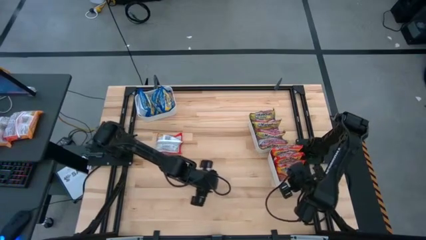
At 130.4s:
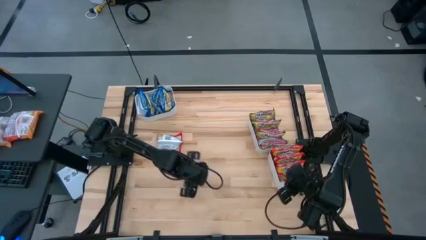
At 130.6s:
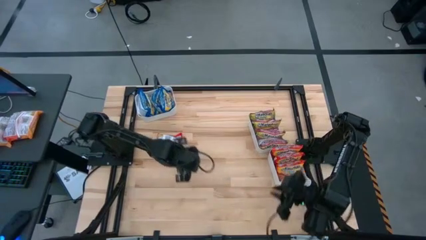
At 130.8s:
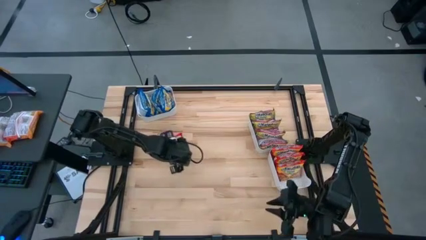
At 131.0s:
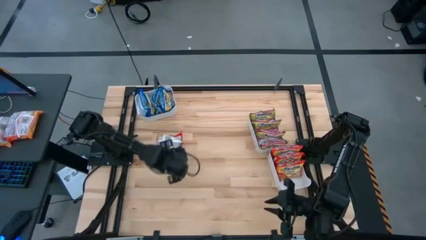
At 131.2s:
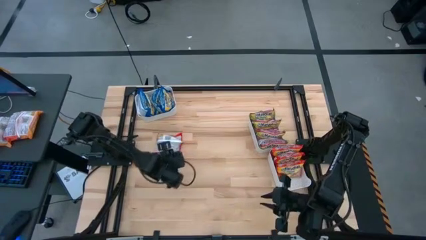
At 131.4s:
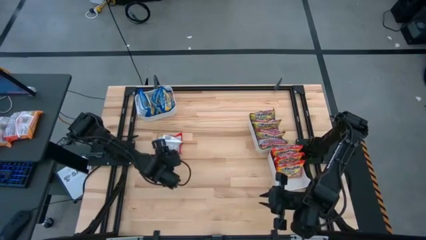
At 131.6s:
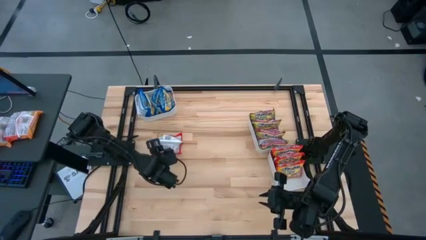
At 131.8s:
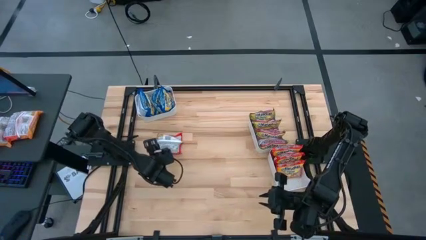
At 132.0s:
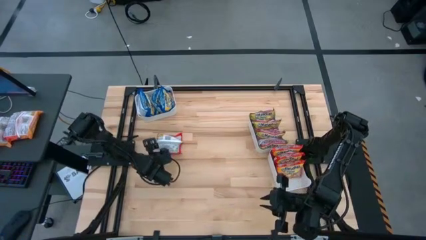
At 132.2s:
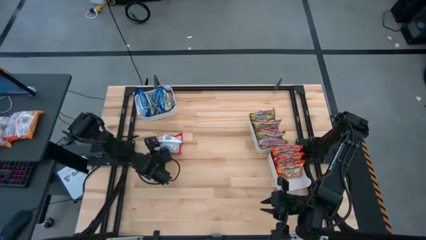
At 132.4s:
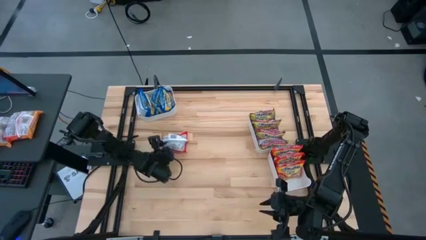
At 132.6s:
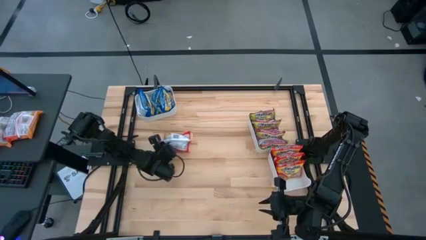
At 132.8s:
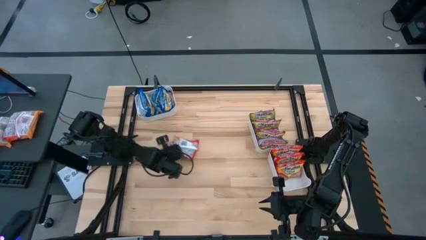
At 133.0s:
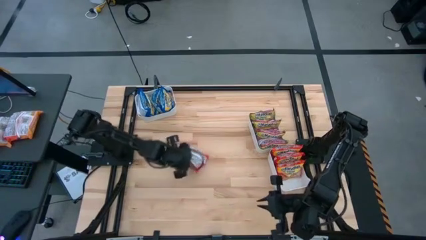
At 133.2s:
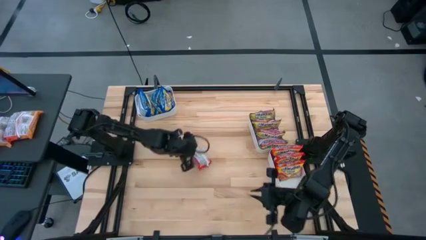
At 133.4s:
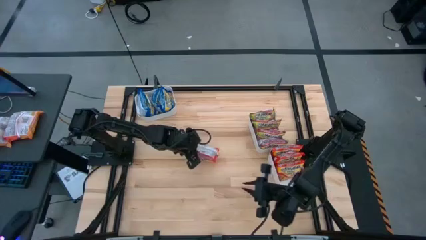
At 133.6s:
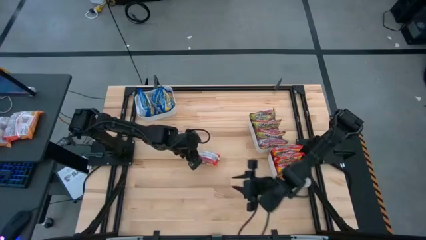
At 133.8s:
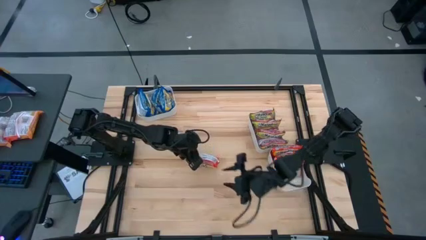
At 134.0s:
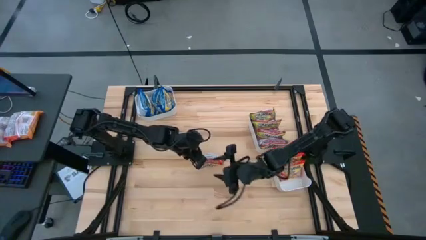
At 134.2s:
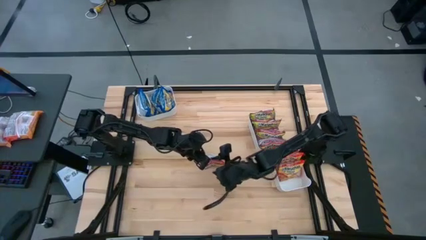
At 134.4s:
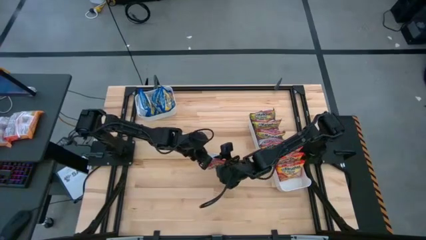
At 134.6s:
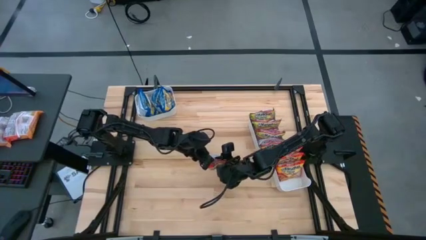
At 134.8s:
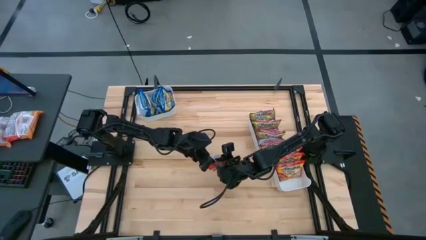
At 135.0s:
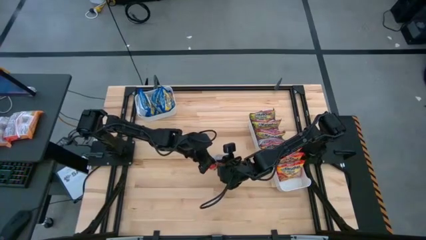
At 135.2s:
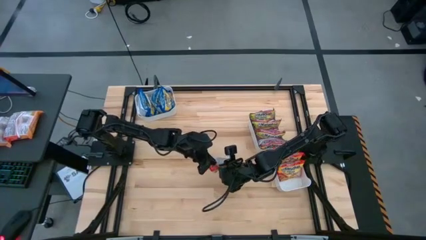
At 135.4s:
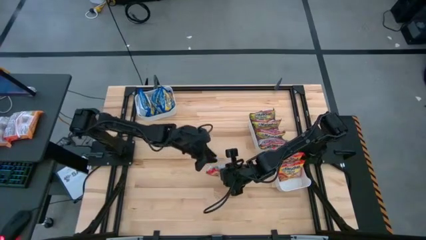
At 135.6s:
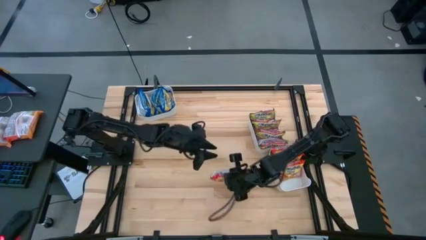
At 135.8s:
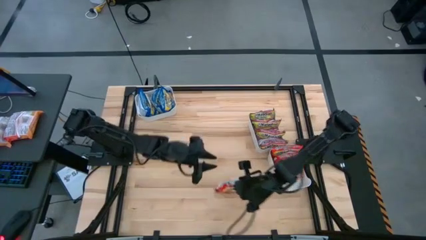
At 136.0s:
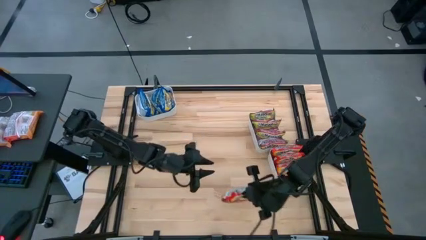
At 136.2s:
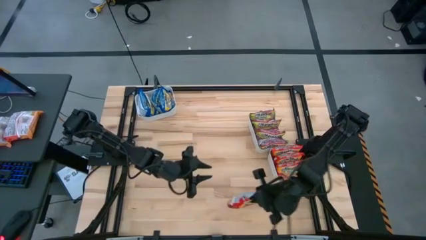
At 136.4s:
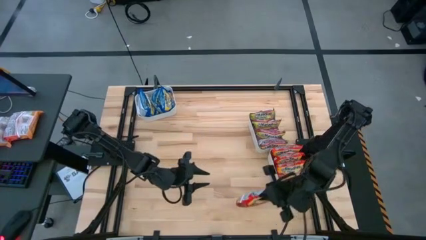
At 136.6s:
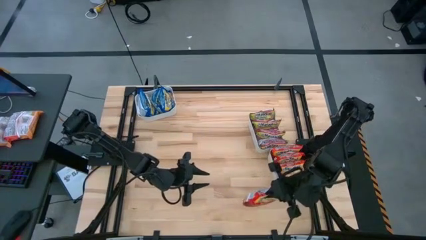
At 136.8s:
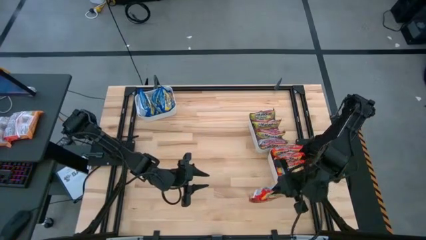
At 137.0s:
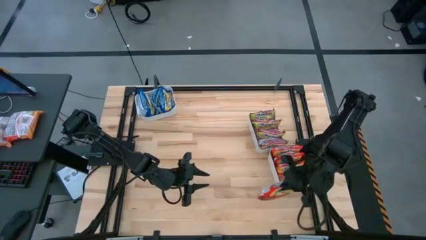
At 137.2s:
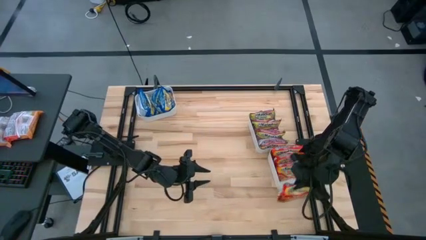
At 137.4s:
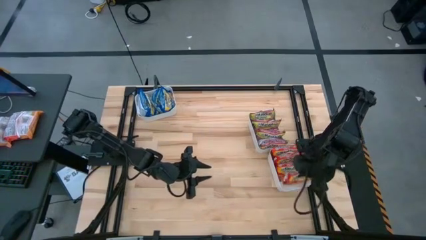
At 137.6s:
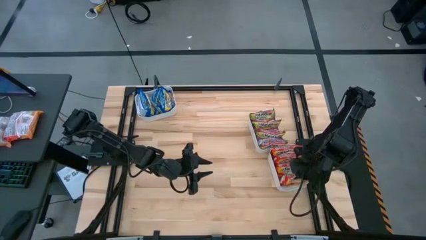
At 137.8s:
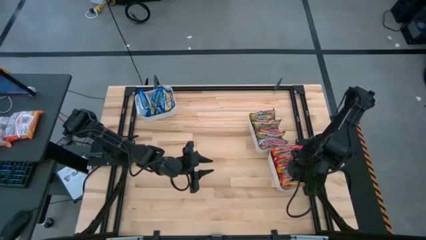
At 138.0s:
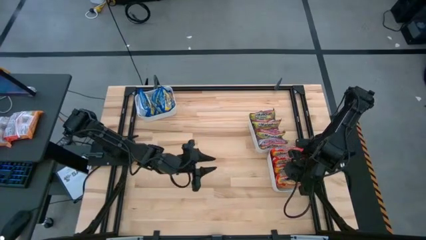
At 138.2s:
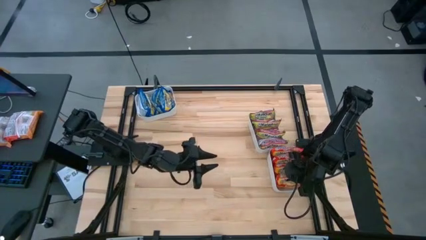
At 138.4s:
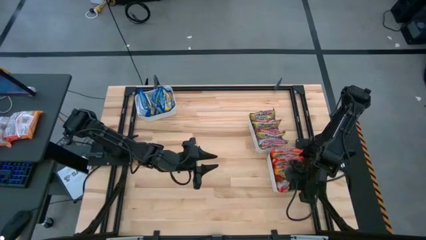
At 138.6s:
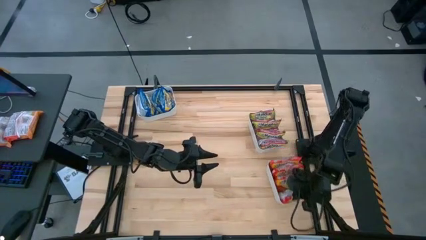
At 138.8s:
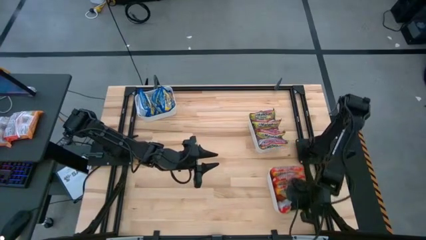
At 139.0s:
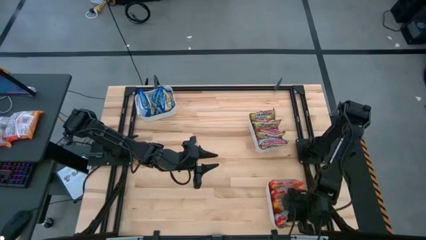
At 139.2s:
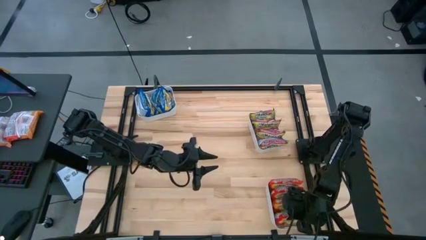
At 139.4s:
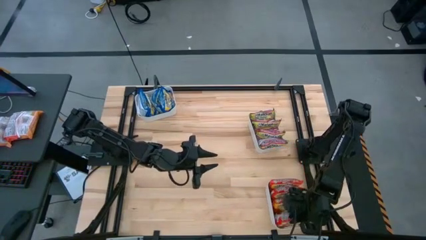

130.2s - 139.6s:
Task: Sort Maruchan noodles
Put the red noodle pack into the bottom right white bin

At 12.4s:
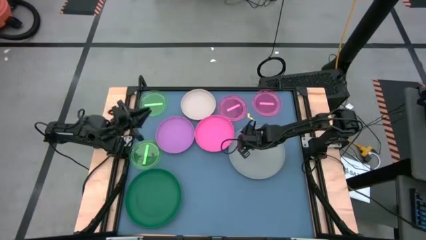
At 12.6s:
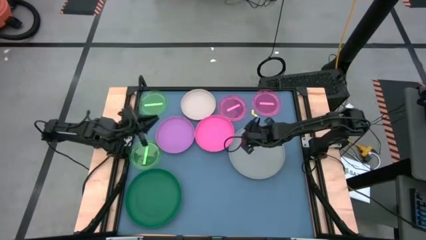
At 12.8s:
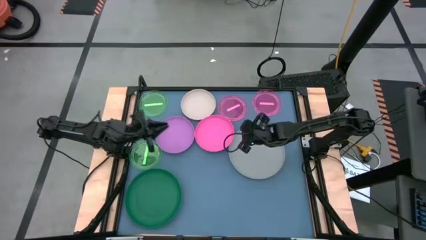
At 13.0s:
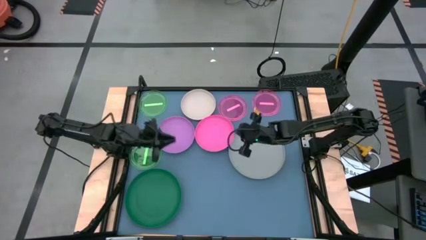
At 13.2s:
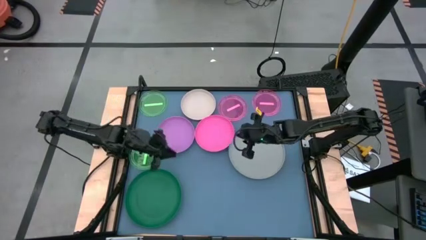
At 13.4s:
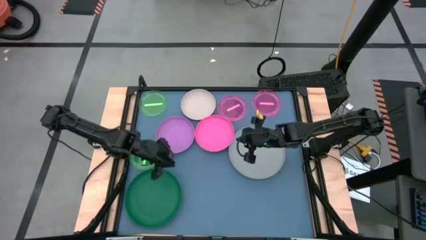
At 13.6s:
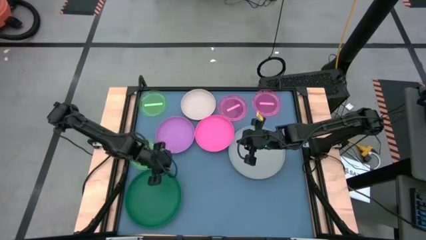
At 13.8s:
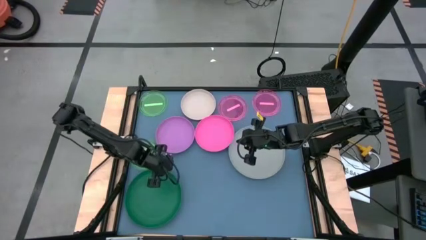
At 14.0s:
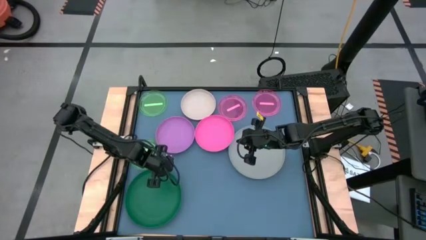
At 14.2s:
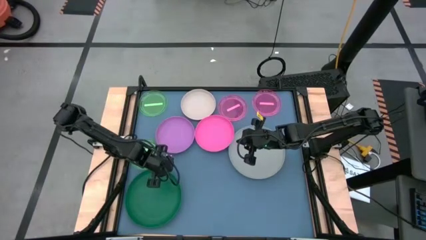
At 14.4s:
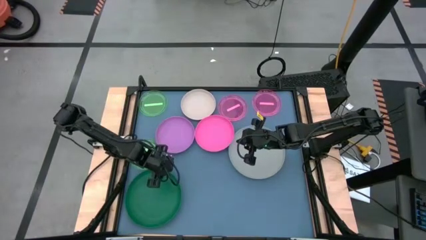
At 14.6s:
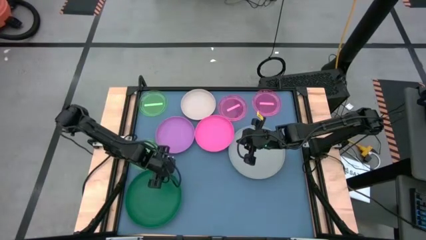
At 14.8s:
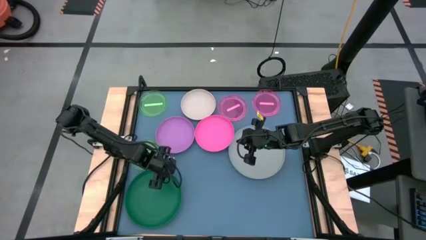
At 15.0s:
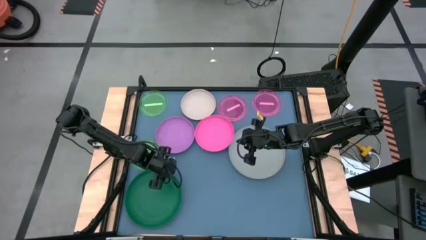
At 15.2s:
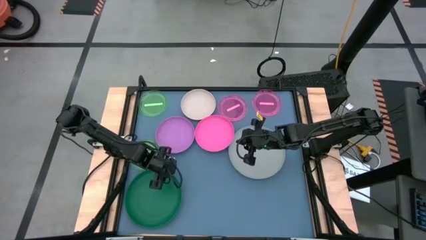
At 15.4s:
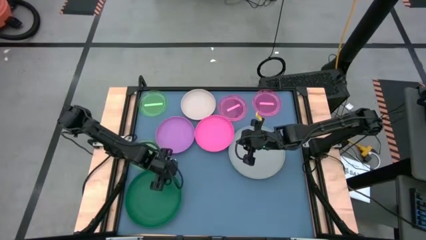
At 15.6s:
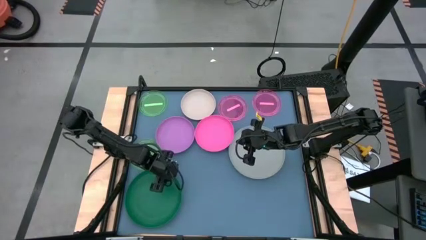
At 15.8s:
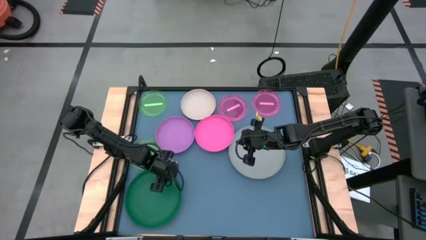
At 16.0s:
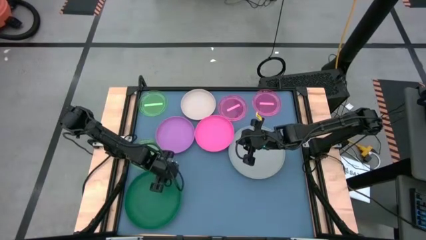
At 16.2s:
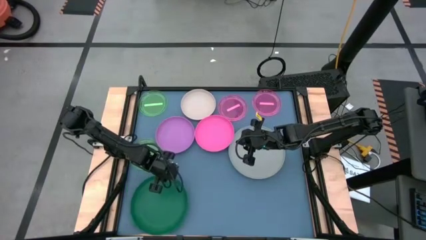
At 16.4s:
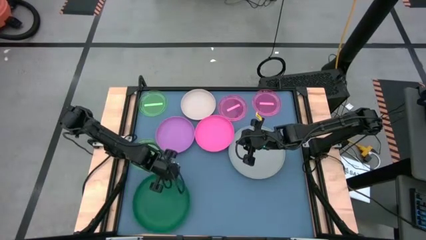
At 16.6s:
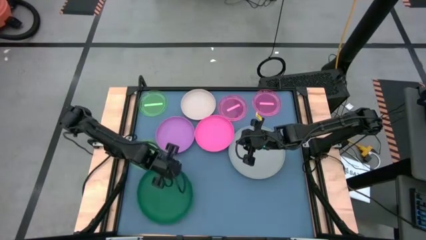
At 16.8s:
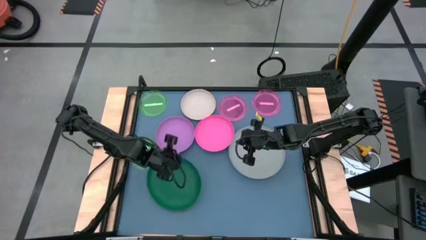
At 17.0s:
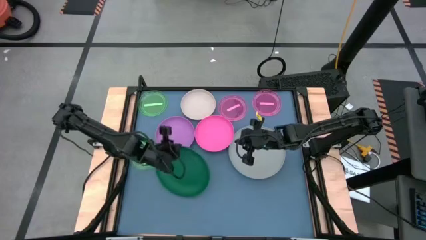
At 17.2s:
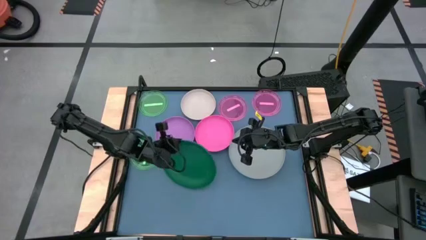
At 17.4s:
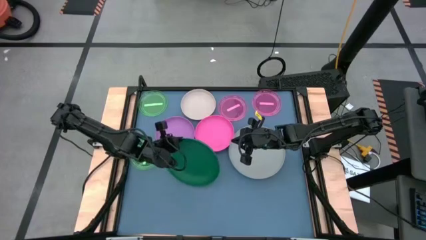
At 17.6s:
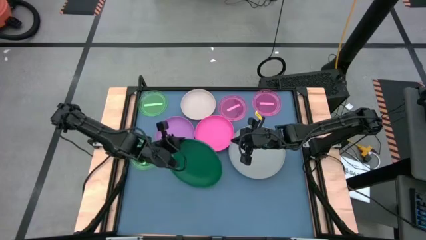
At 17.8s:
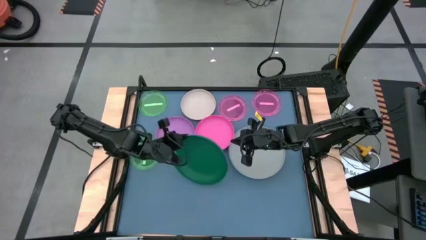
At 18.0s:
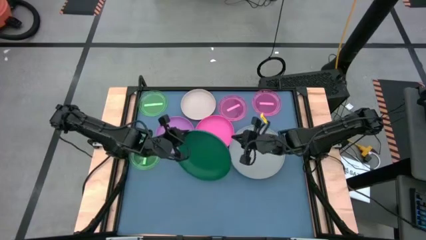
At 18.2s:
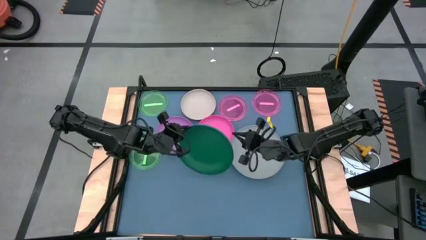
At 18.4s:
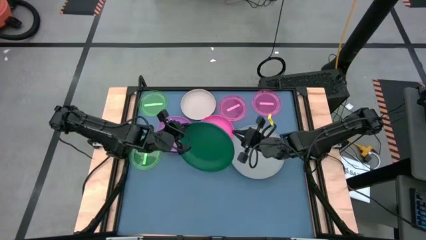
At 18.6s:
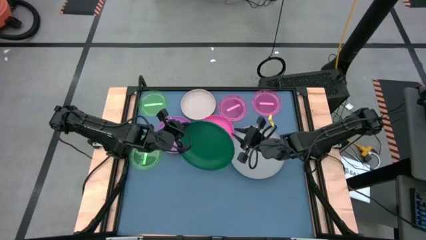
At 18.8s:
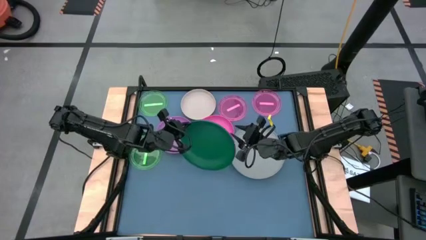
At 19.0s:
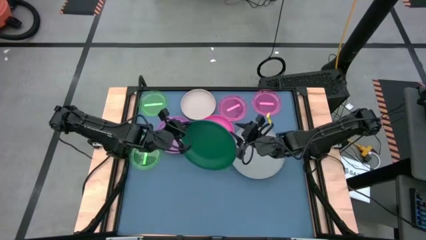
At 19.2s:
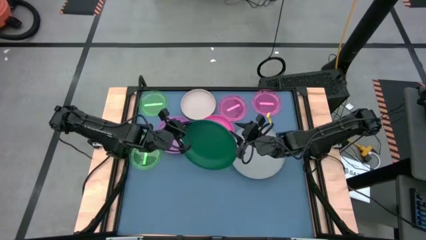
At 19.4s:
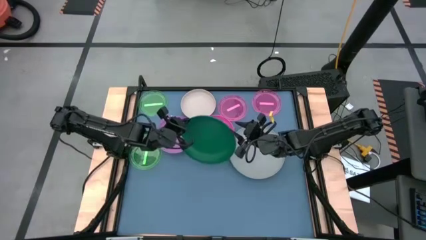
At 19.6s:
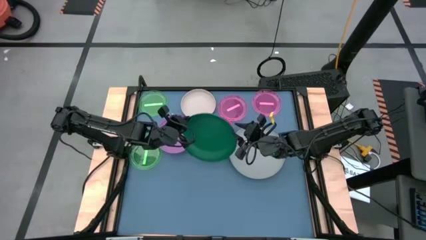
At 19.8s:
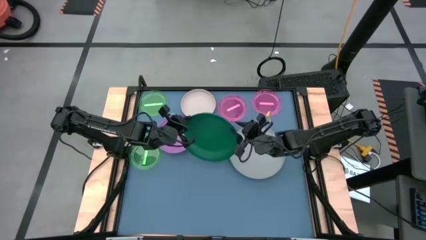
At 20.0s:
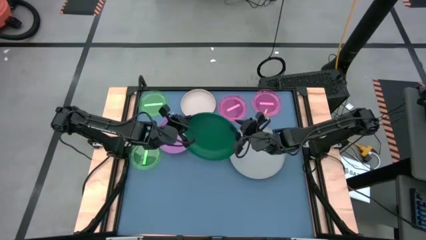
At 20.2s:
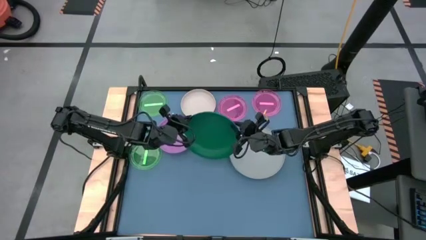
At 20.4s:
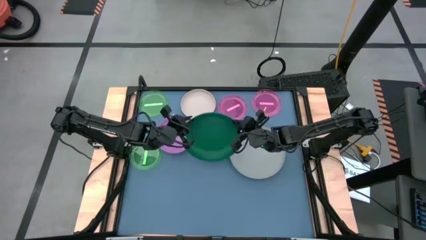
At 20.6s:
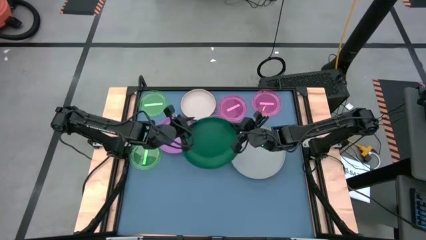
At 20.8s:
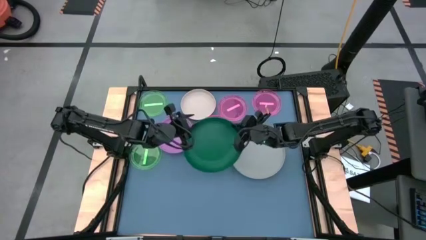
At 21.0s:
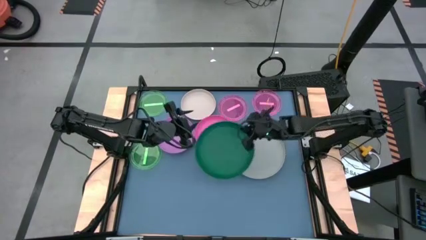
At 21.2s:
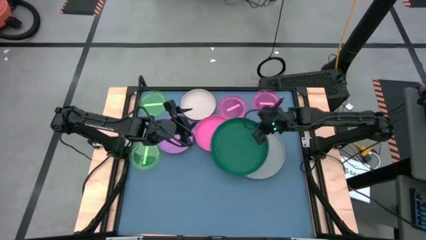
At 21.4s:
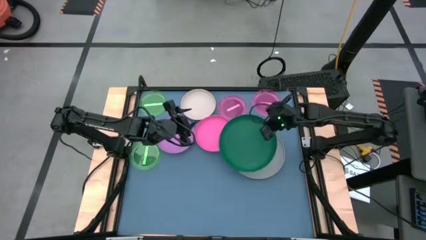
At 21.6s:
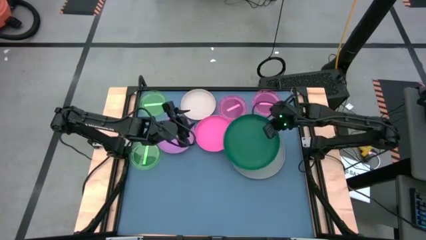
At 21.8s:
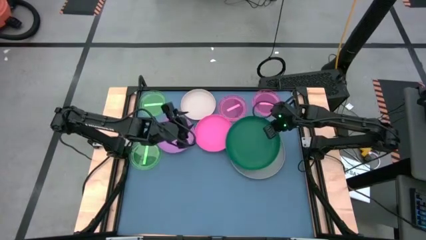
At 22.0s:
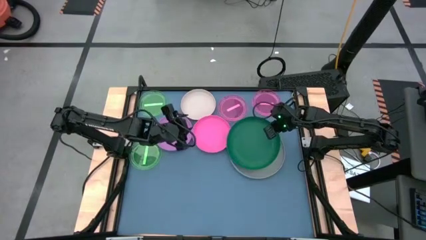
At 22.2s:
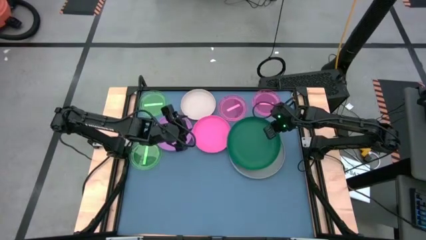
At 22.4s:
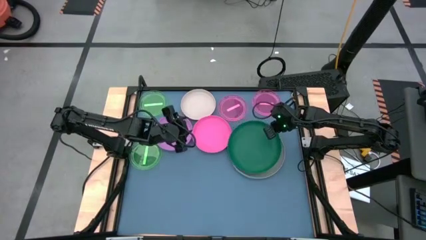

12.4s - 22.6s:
Task: Stack plastic plates
Stack the green plate on top of the gray plate
